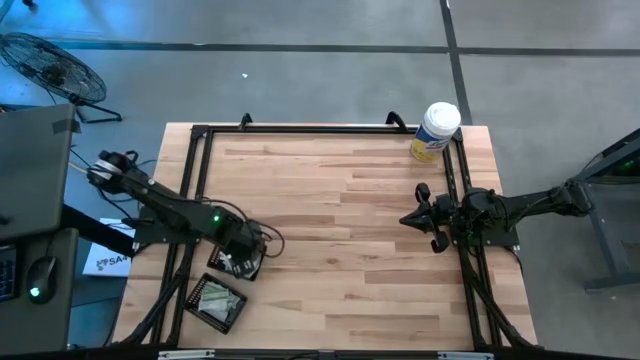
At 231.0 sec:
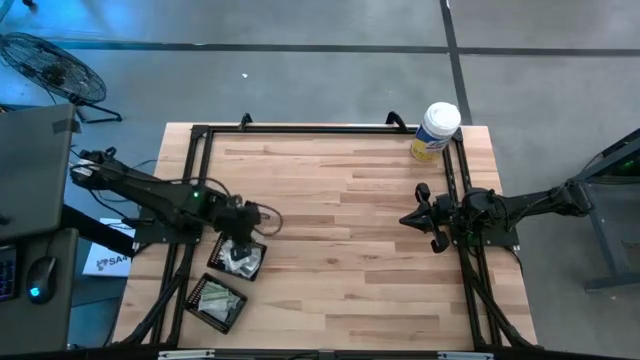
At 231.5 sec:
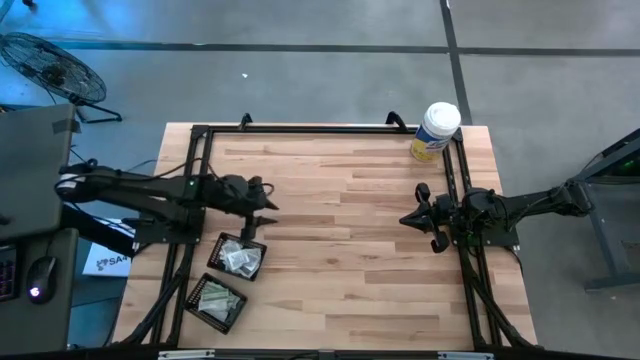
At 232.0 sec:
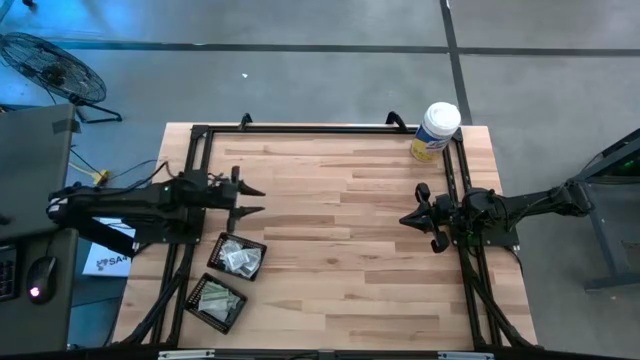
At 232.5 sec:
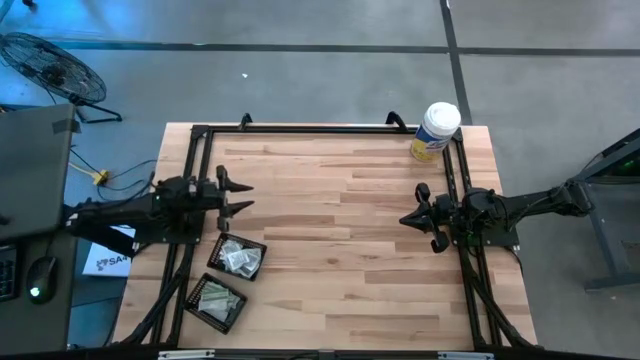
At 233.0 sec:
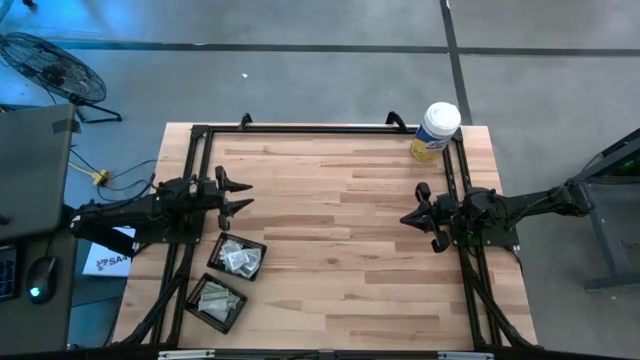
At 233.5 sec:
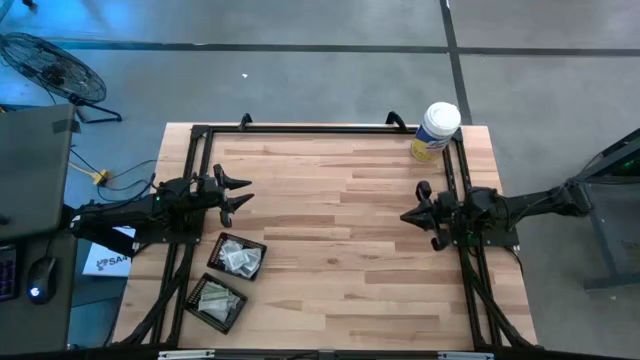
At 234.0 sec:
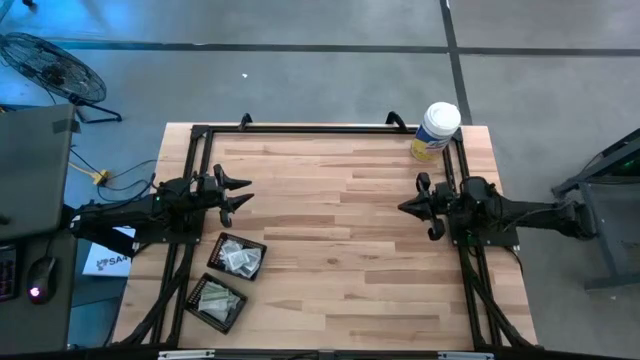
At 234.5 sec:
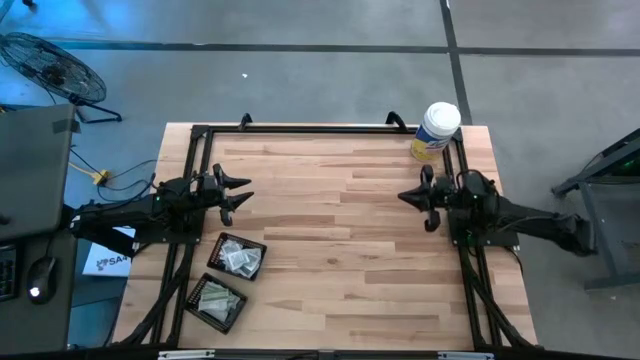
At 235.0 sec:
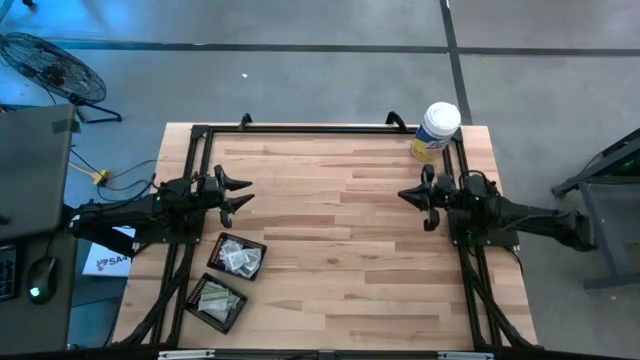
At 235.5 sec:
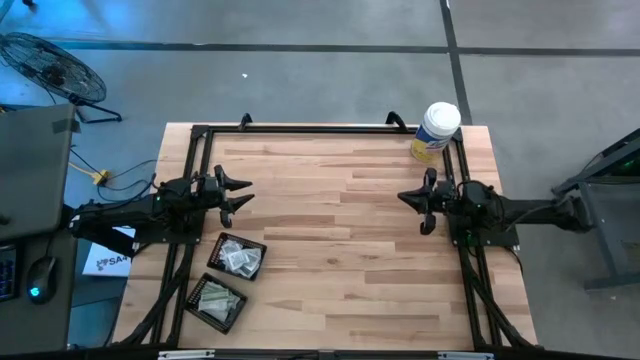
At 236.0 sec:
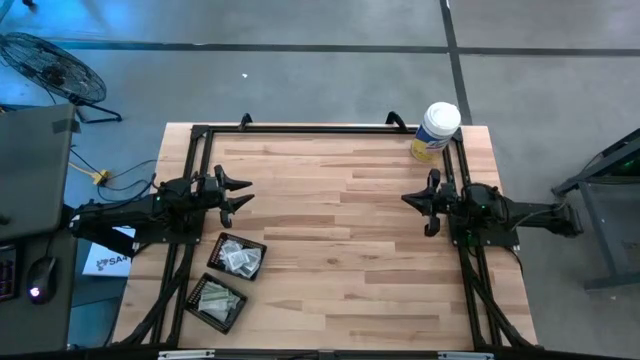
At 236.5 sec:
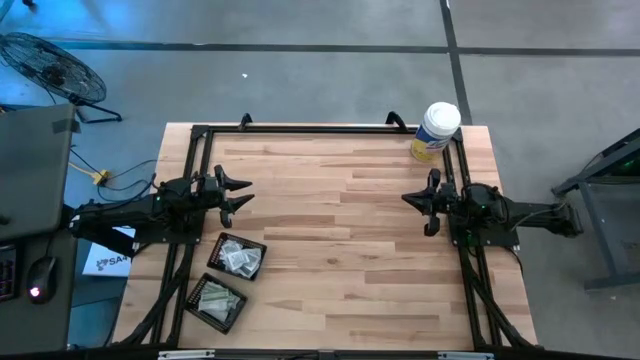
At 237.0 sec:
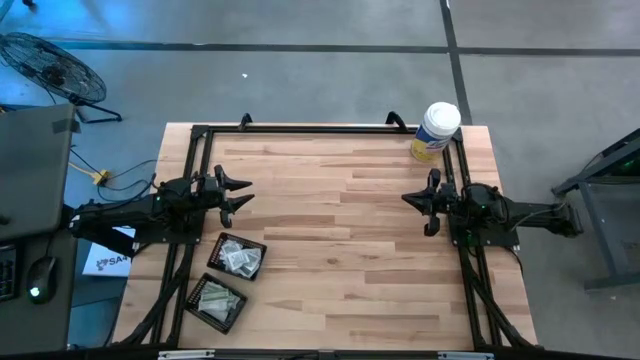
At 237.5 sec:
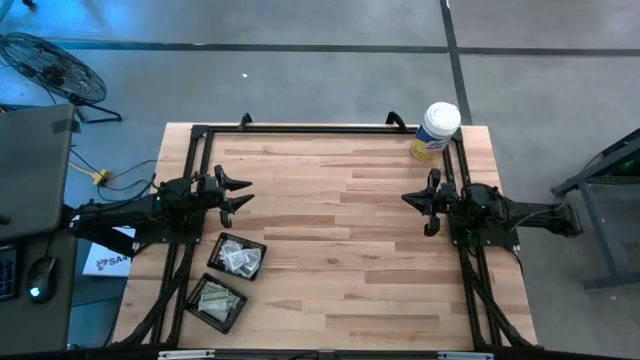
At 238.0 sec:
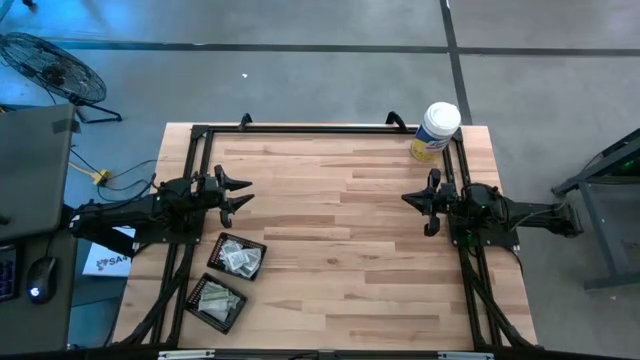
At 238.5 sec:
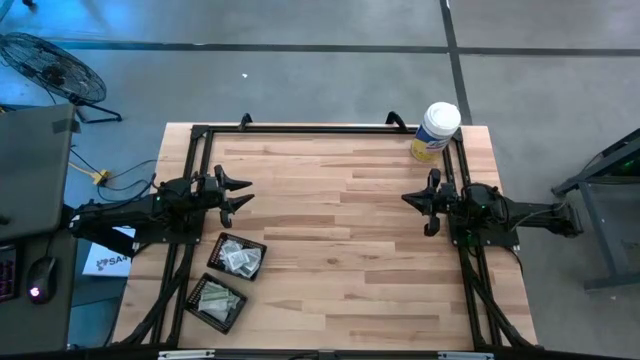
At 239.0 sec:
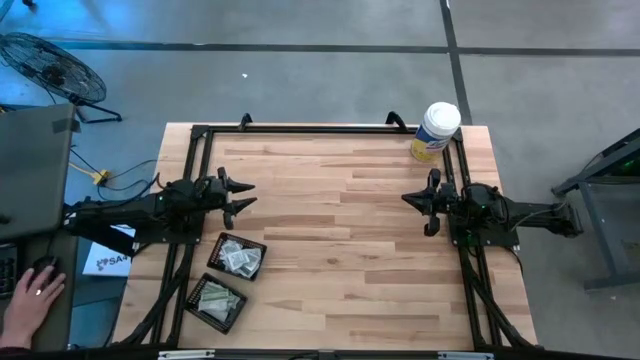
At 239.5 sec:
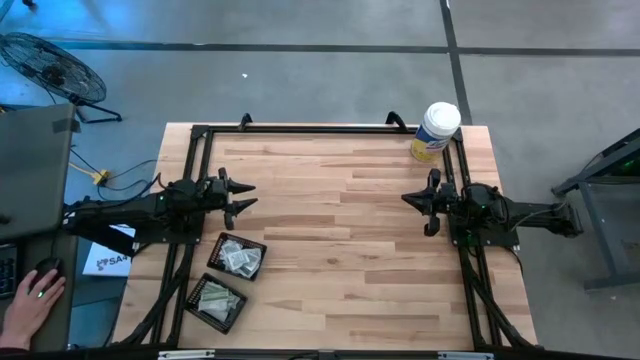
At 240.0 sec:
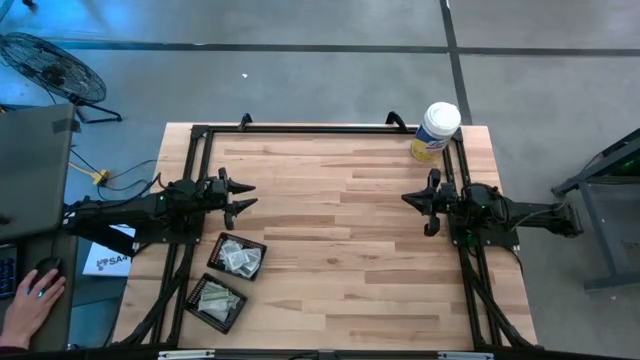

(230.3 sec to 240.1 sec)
Task: Pick & Place First Aid Supplies
Return To Home Position

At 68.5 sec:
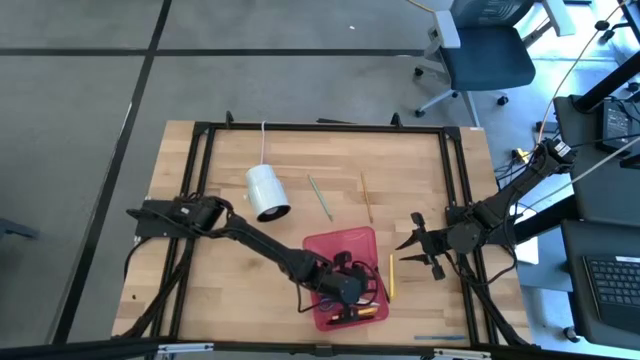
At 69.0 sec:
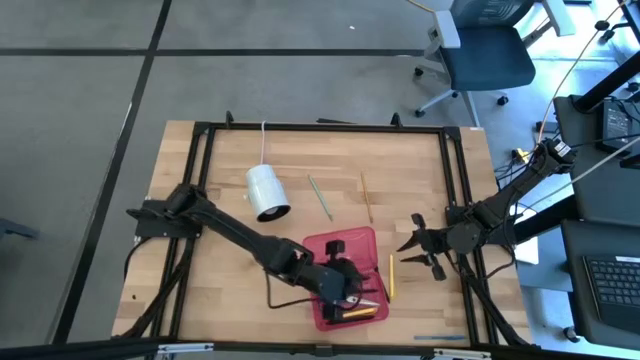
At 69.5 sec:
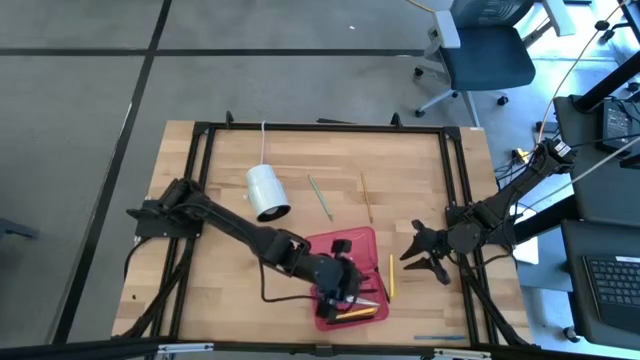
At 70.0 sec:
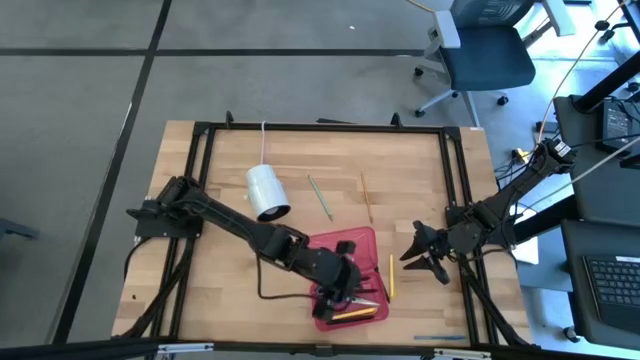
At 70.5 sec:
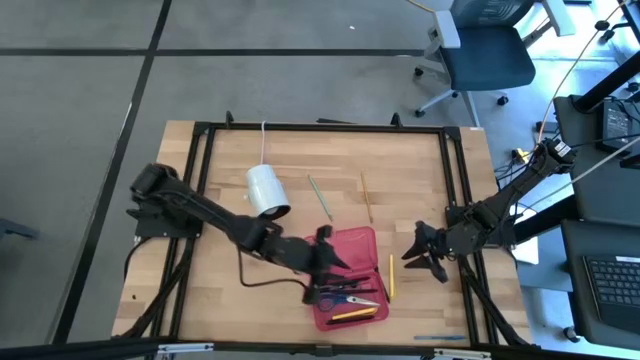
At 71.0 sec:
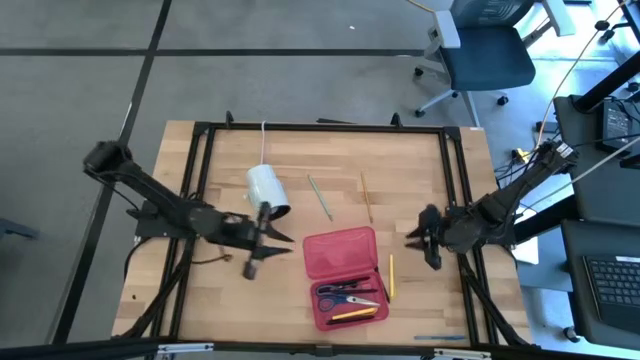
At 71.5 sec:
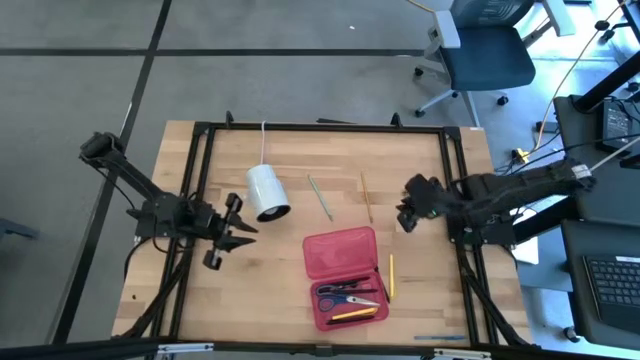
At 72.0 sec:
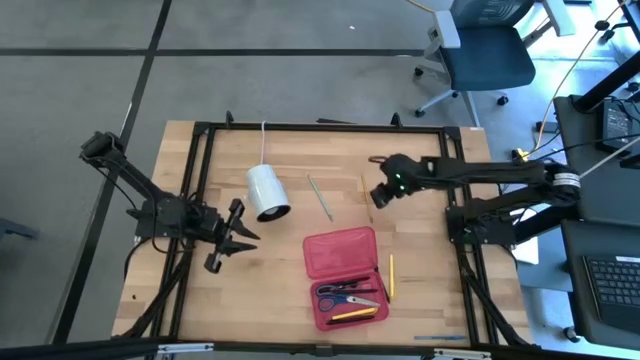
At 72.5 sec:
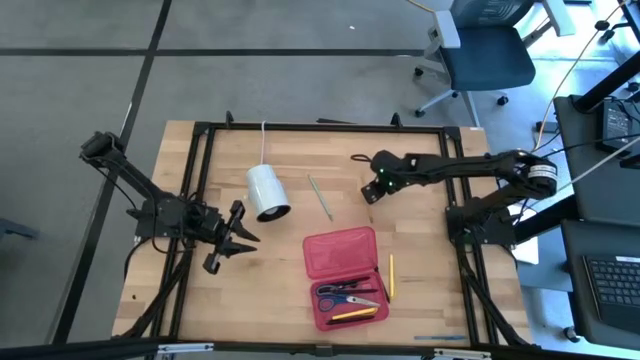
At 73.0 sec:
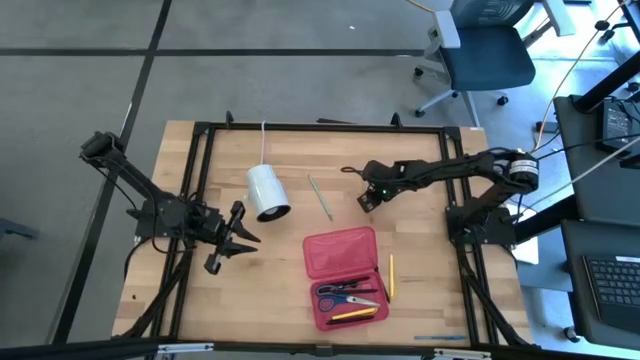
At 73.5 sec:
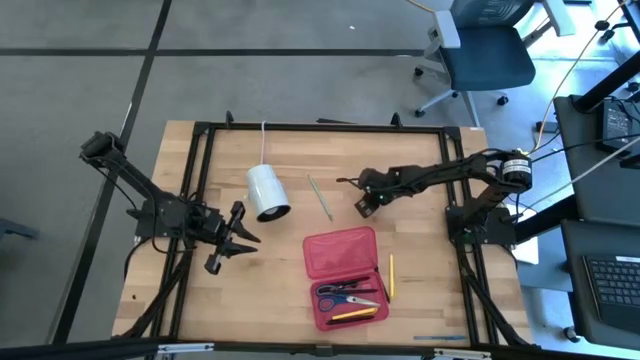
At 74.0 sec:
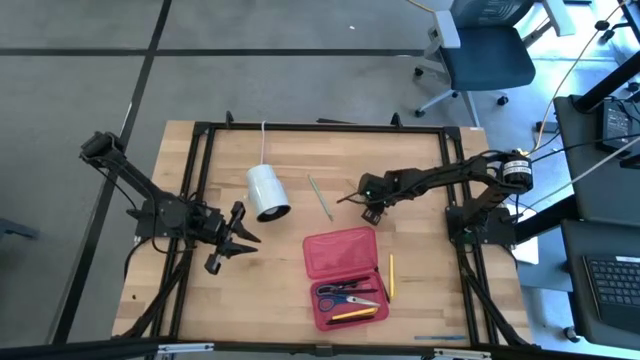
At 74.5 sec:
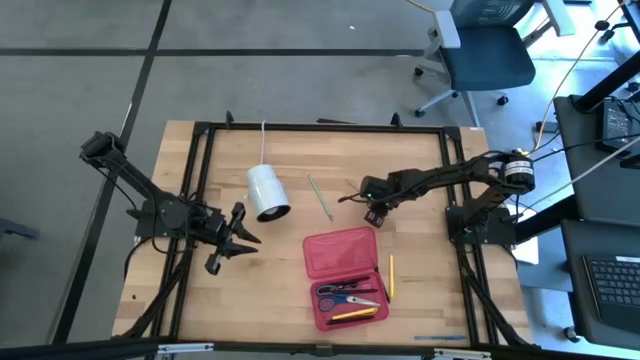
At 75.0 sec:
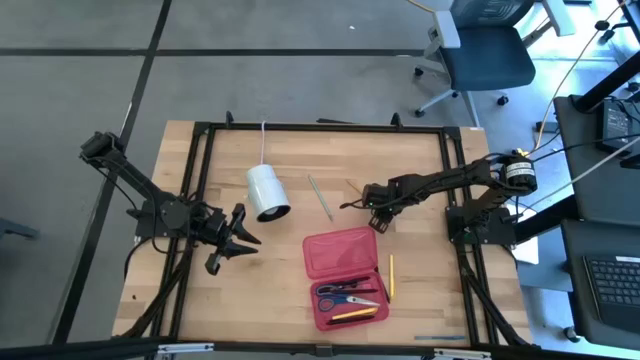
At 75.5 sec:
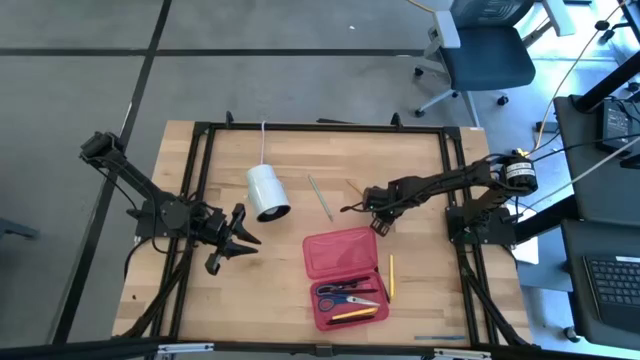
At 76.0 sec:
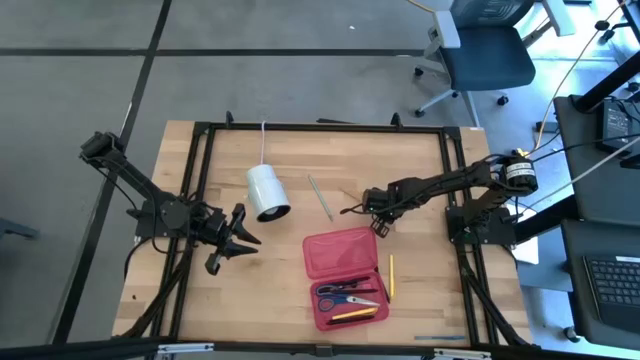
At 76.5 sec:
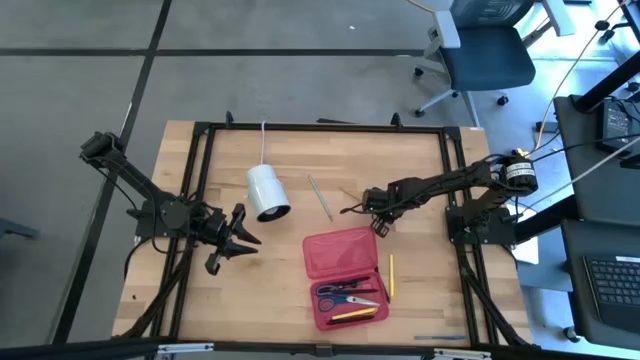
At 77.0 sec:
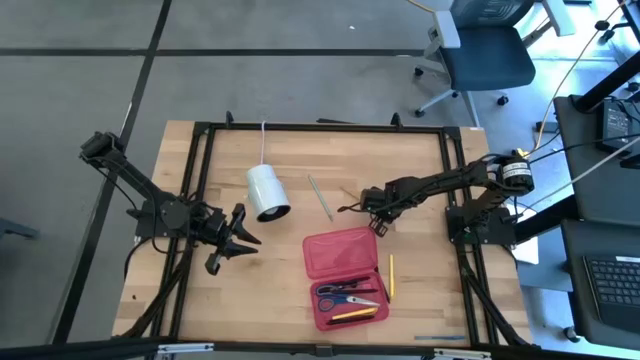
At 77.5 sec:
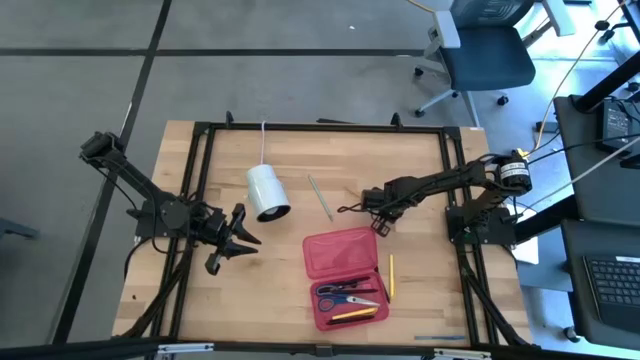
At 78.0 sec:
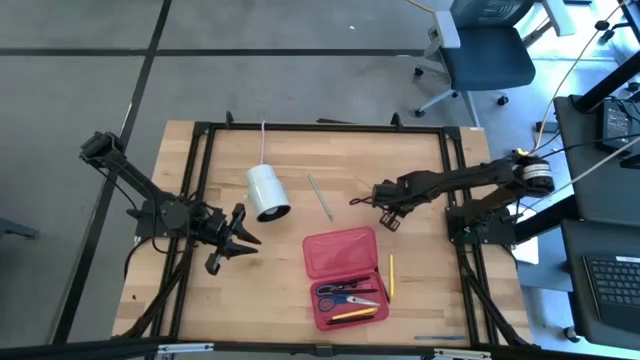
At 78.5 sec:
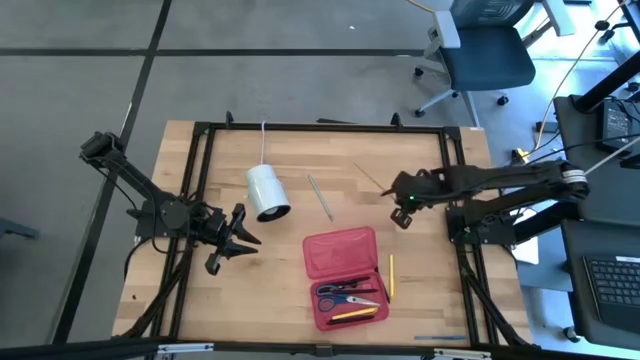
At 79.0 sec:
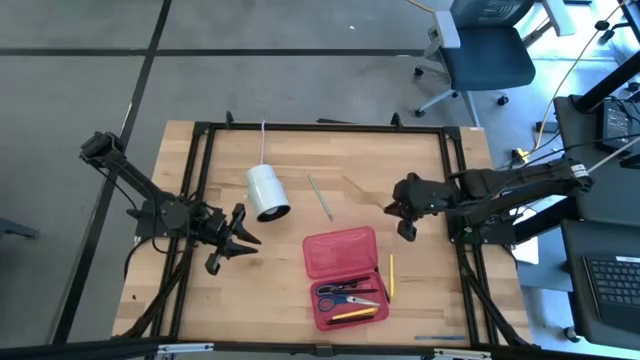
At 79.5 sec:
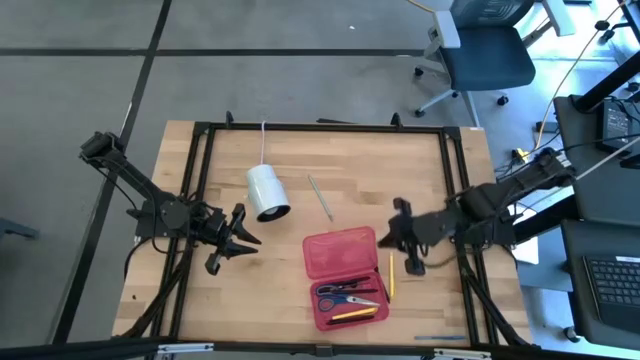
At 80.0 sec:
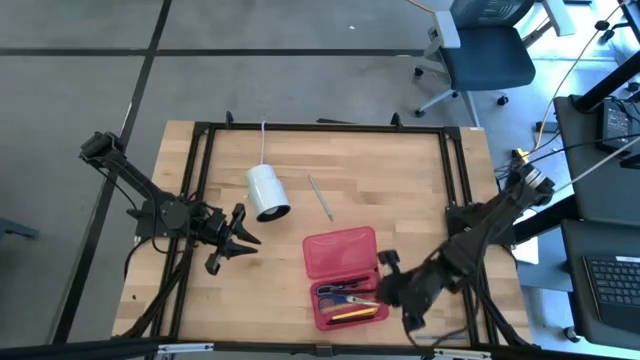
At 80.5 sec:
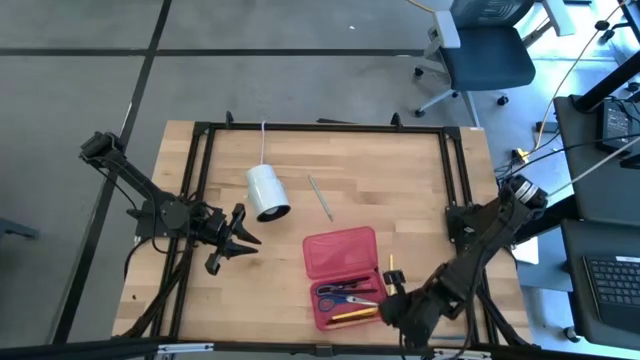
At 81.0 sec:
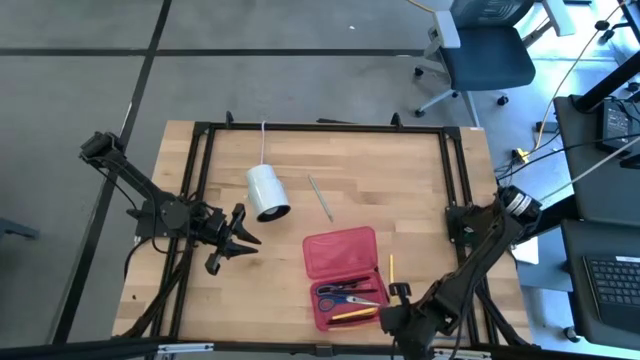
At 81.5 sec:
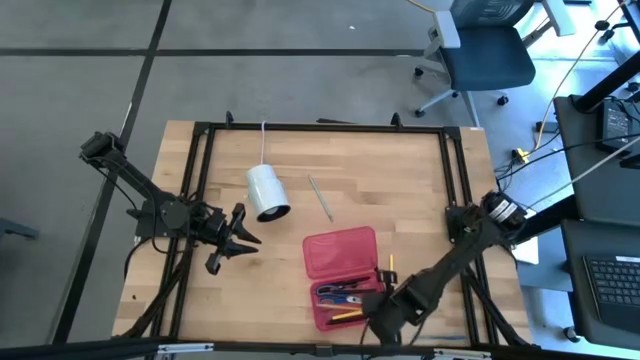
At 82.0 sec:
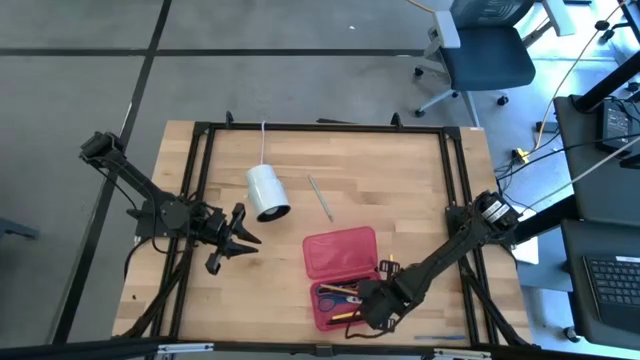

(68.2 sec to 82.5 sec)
Task: Pick & place school supplies into a supply box
Put the yellow pencil into the pink supply box
